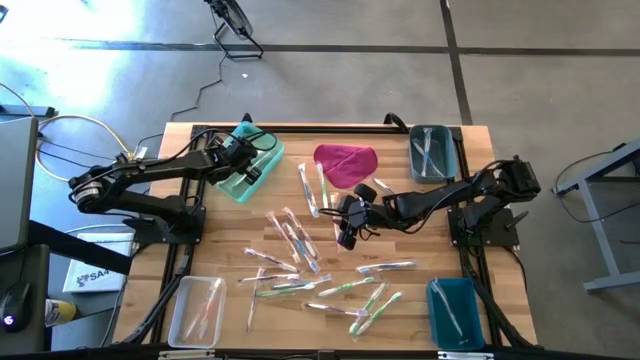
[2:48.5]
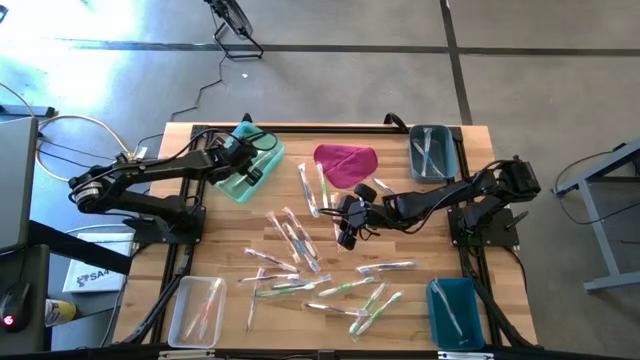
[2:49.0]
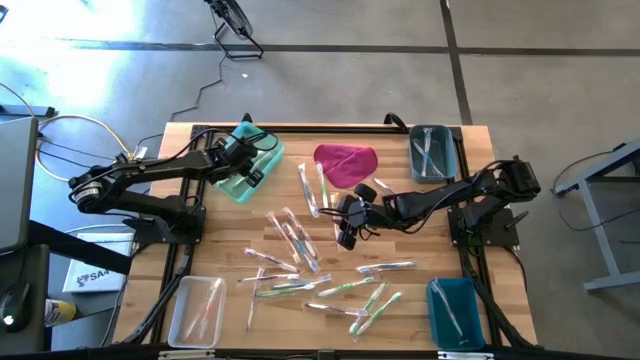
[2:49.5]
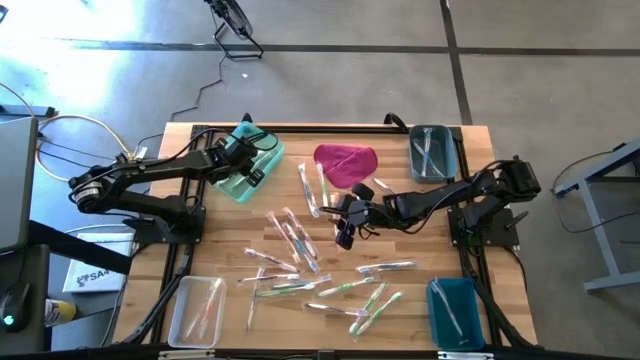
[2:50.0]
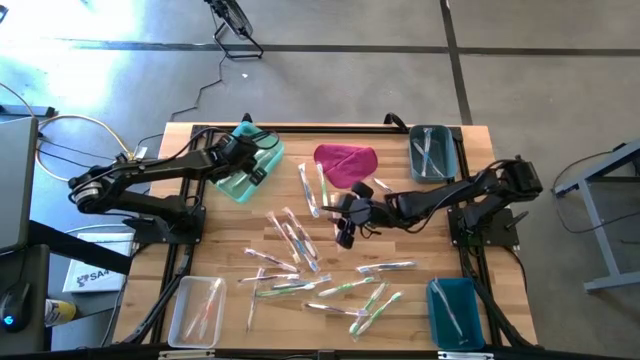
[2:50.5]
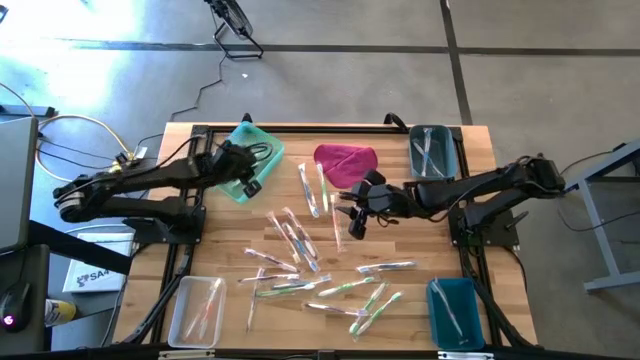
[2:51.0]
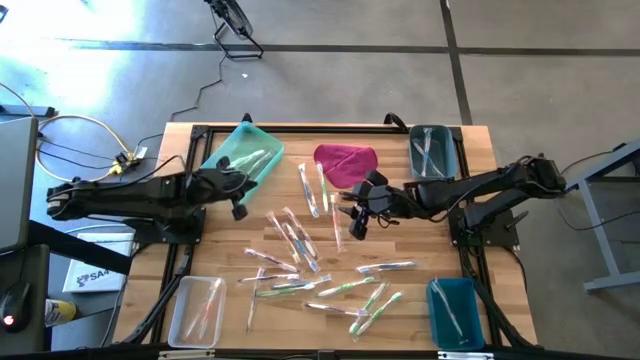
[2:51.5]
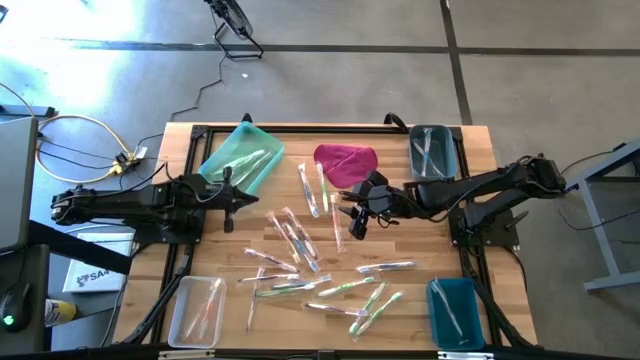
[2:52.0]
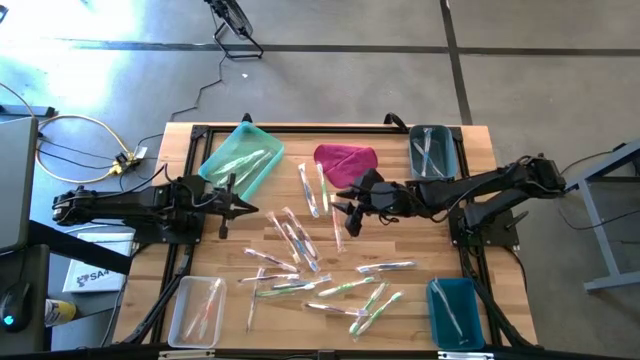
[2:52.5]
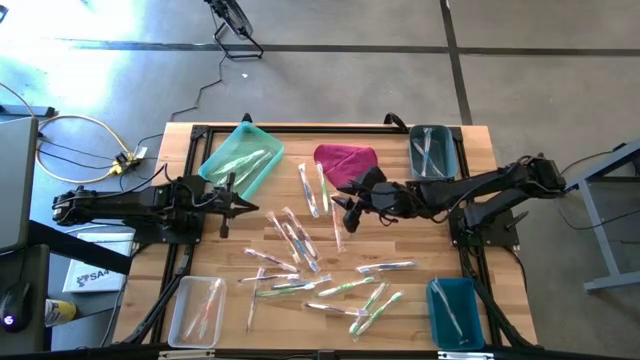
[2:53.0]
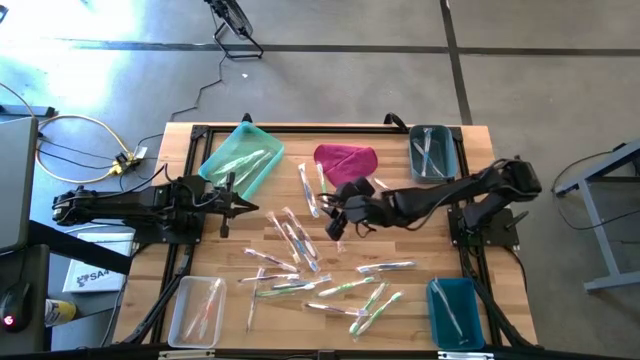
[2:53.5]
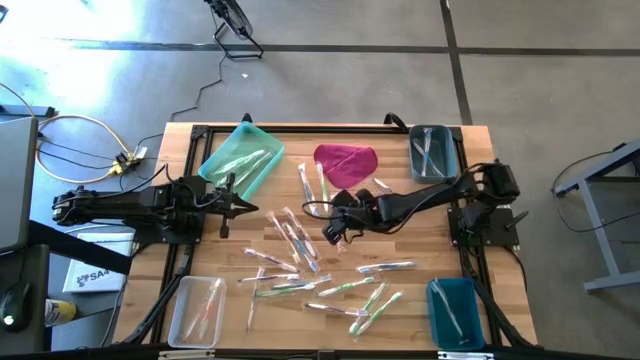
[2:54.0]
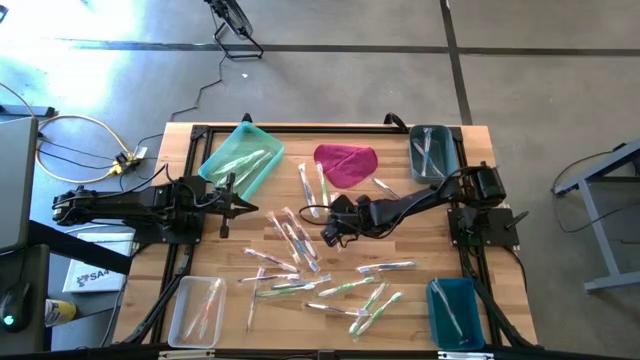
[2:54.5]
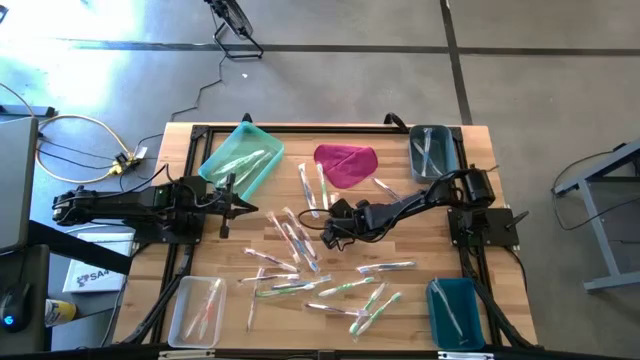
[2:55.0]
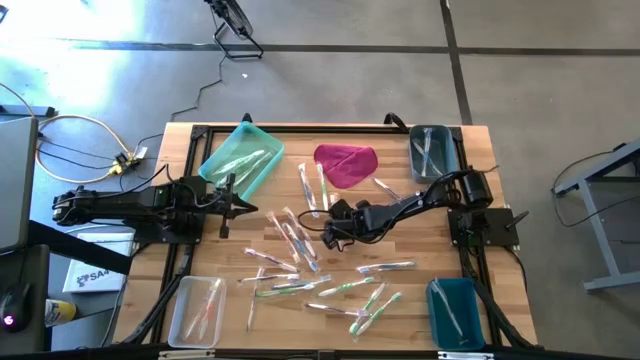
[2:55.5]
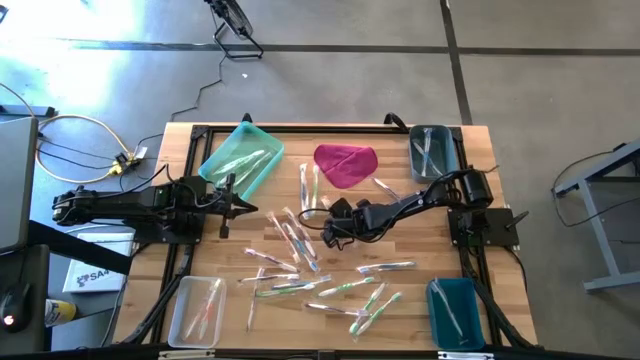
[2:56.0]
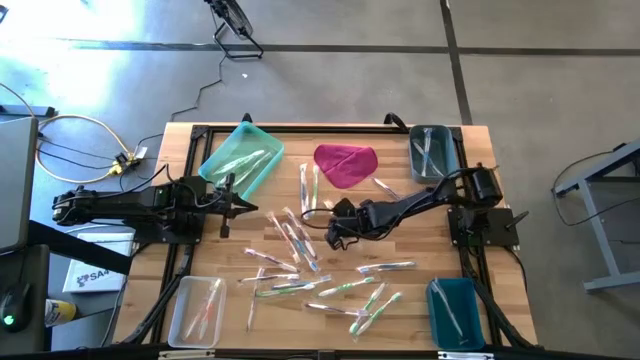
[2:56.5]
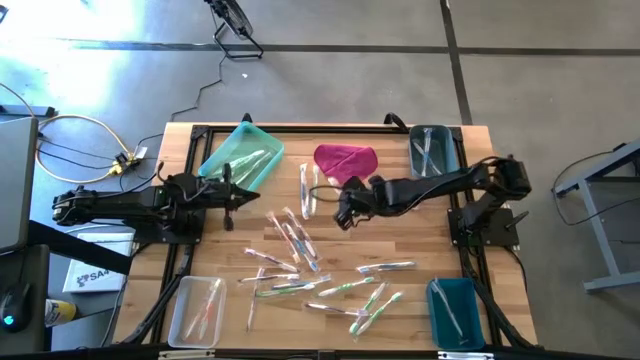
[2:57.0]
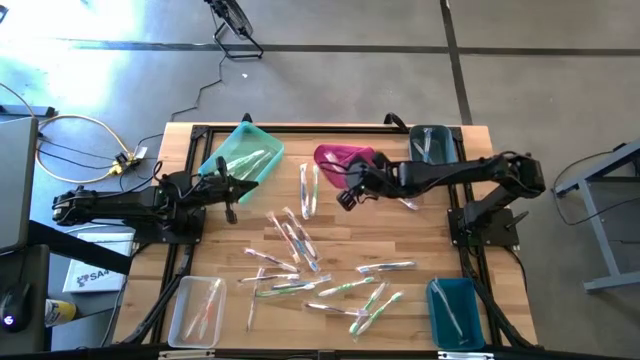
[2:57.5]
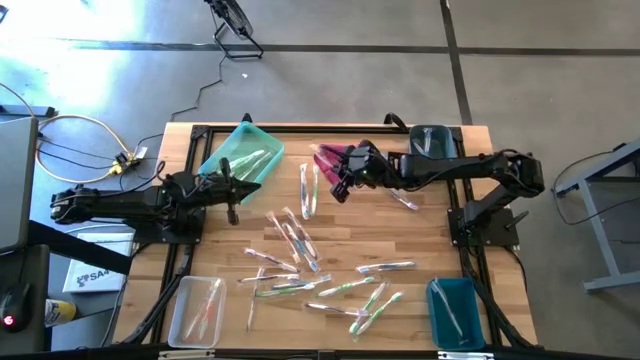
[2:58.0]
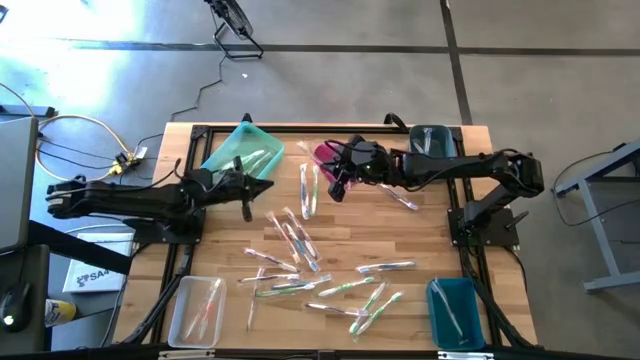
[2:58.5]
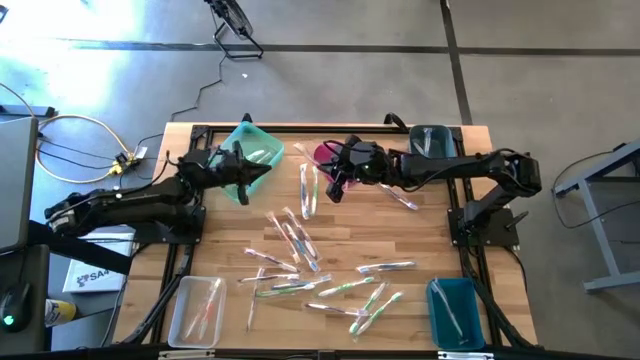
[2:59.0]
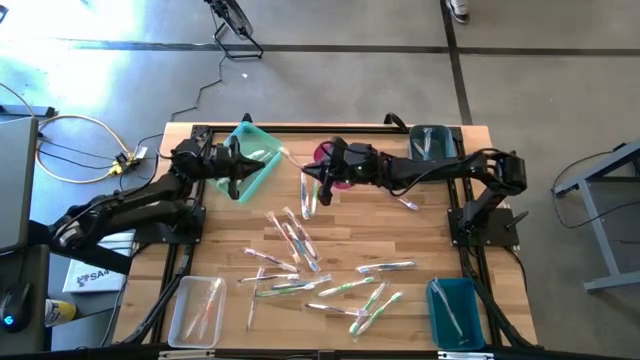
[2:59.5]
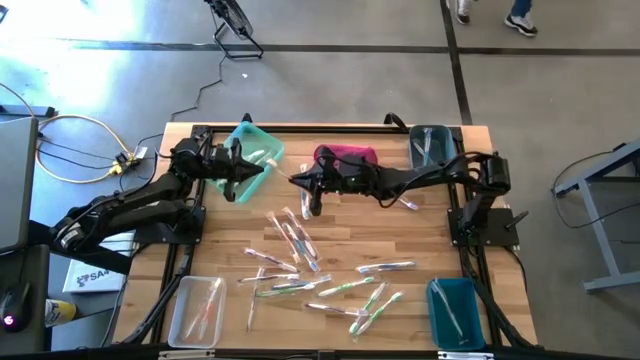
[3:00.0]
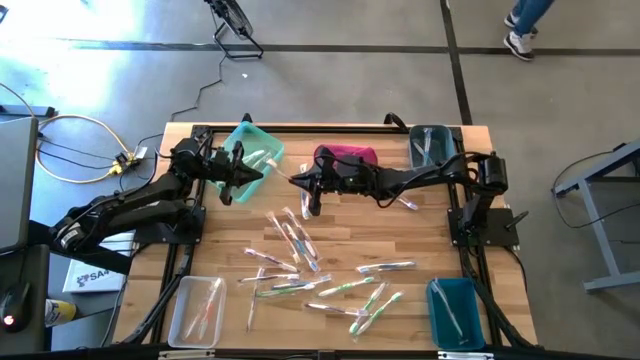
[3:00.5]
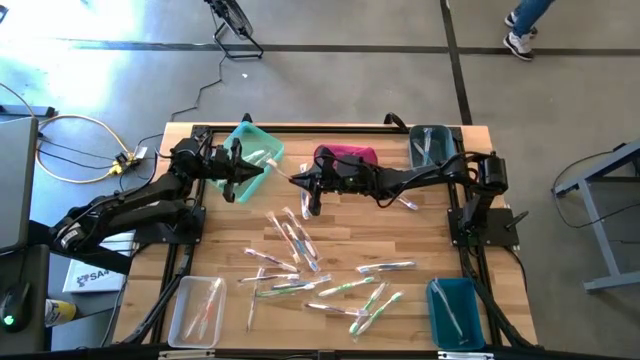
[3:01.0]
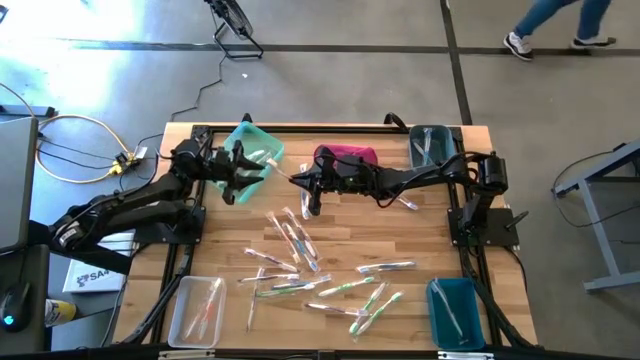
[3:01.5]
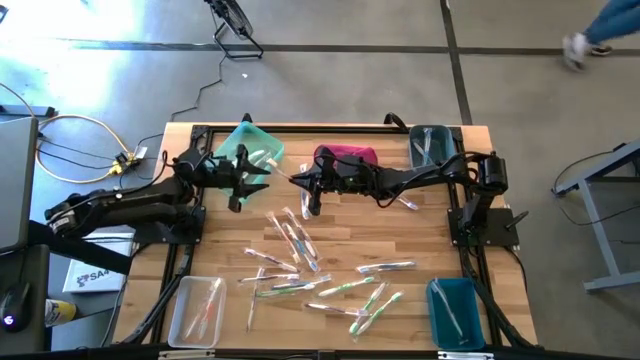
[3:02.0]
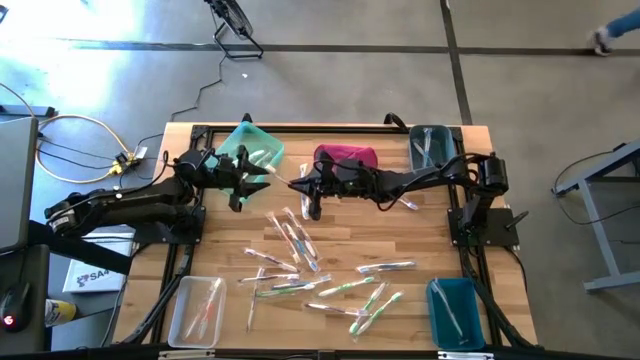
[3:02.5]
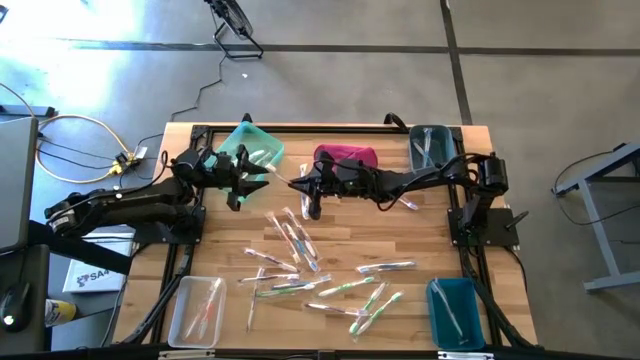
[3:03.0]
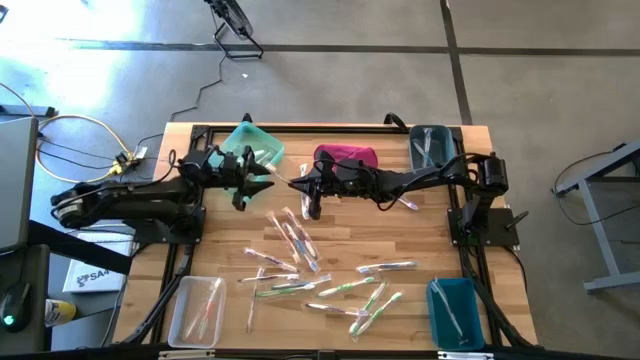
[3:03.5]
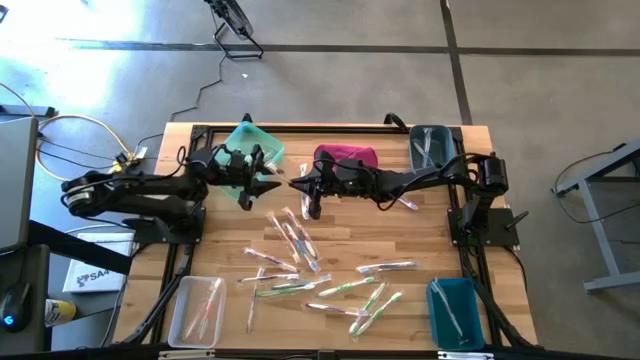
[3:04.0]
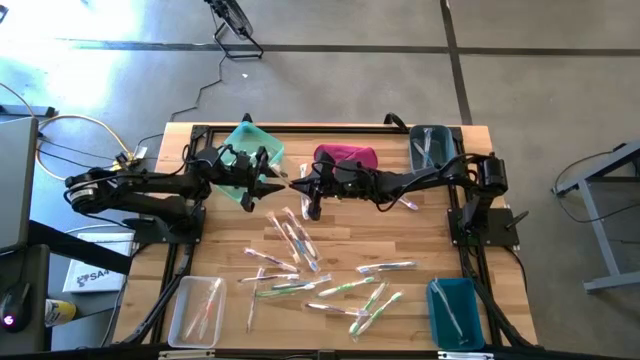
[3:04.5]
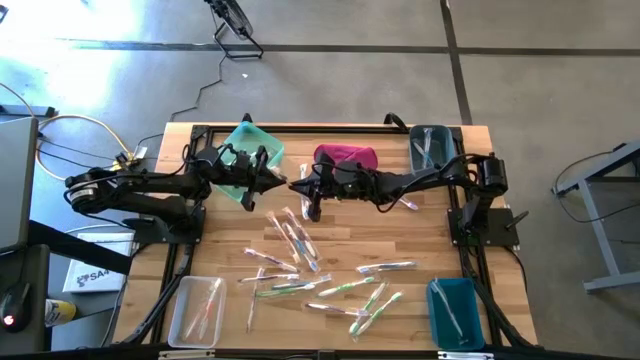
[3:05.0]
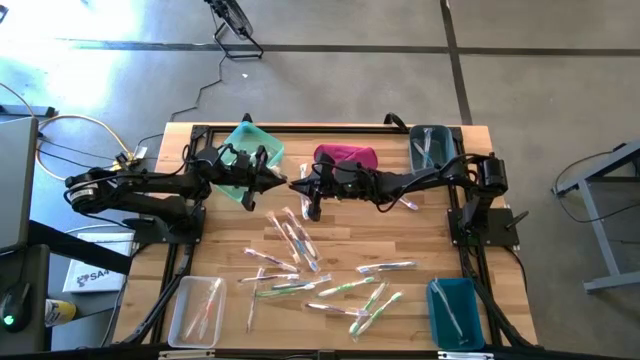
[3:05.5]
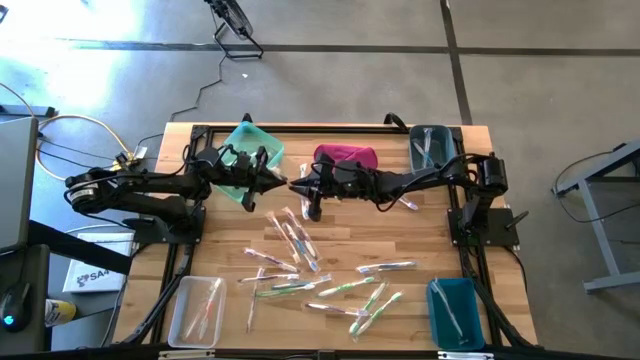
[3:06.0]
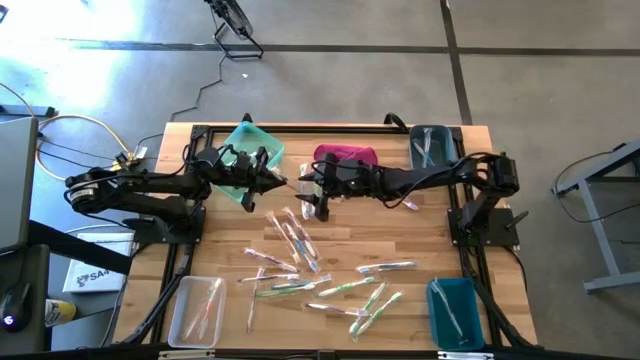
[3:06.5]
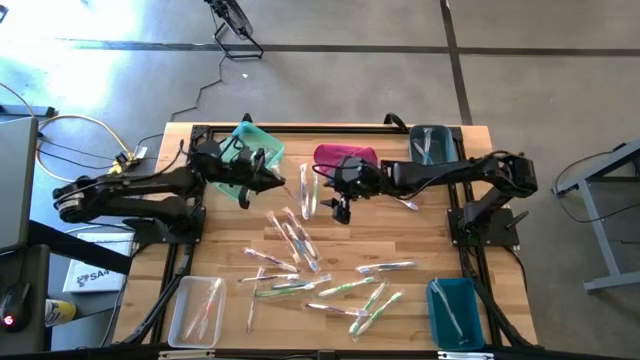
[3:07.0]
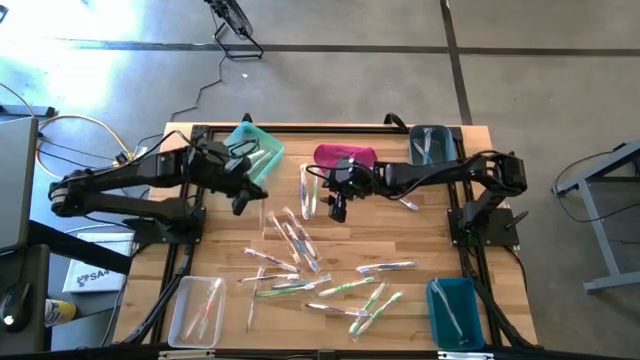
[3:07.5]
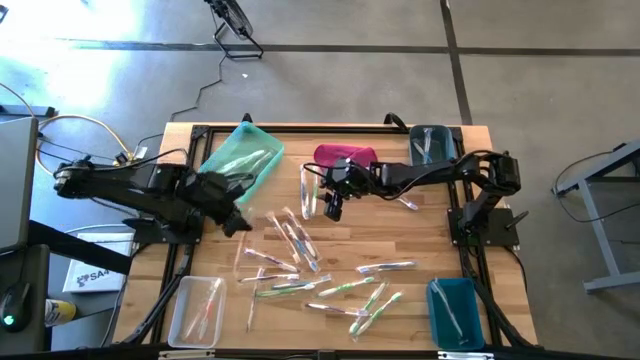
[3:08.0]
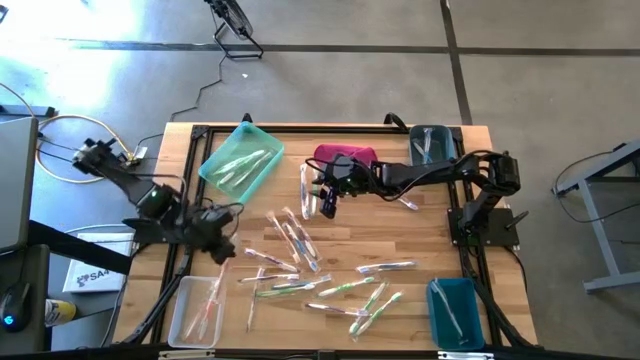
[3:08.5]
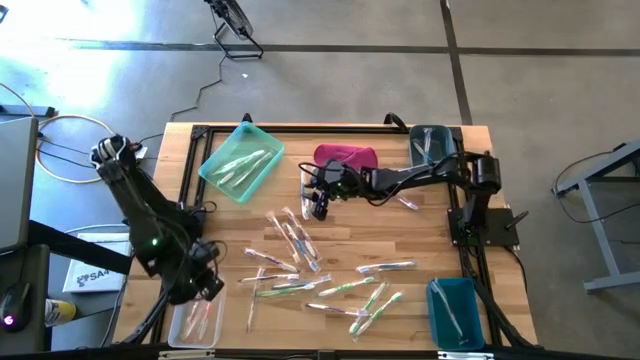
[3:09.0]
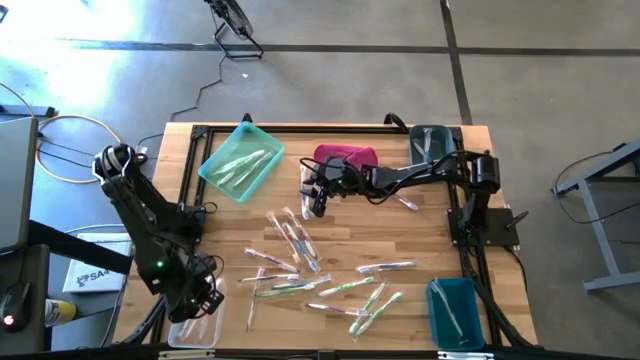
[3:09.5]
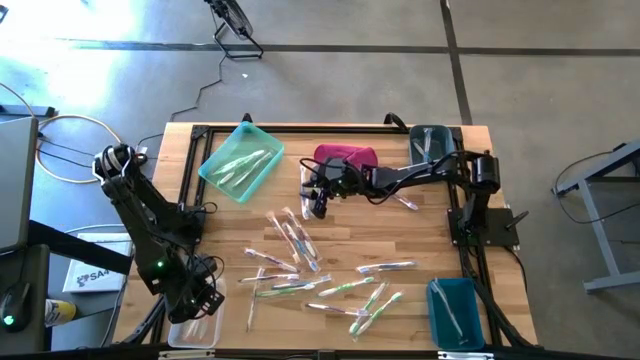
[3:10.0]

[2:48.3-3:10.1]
Task: Pick & Place Toothbrushes
Put the orange toothbrush to the transparent bin
